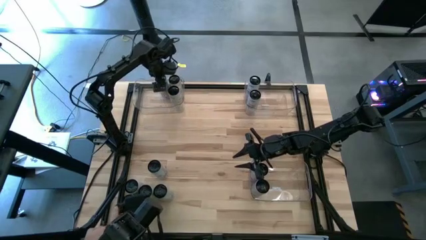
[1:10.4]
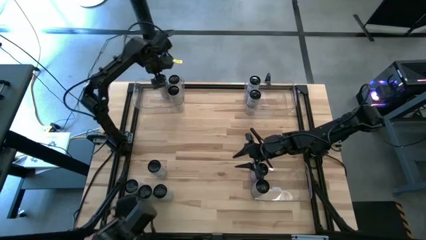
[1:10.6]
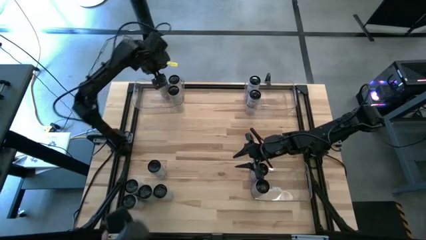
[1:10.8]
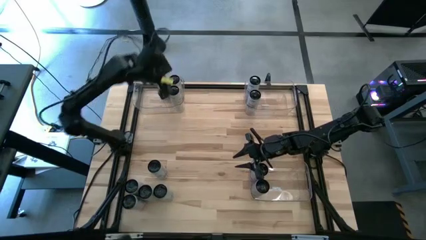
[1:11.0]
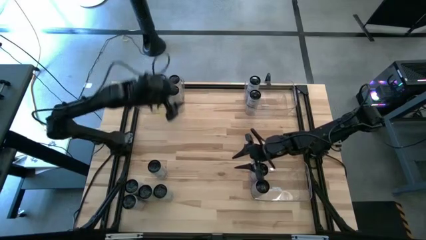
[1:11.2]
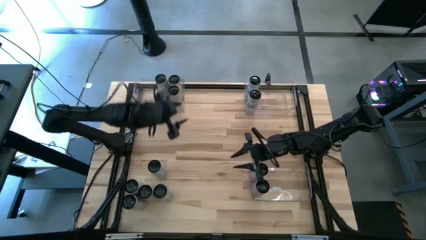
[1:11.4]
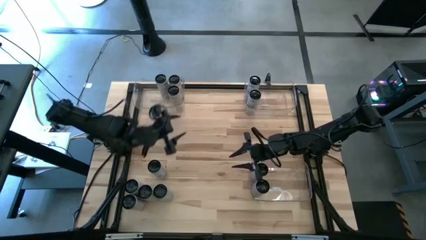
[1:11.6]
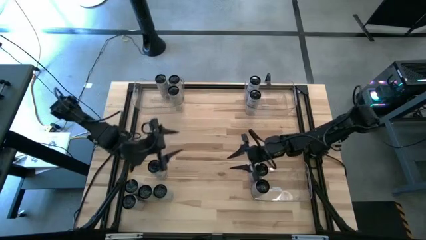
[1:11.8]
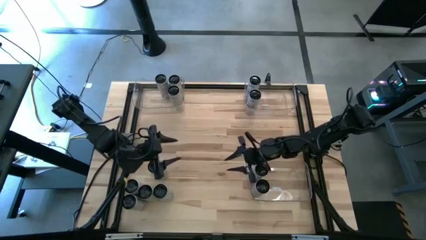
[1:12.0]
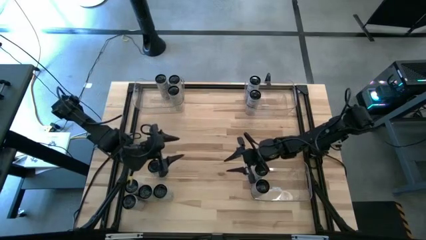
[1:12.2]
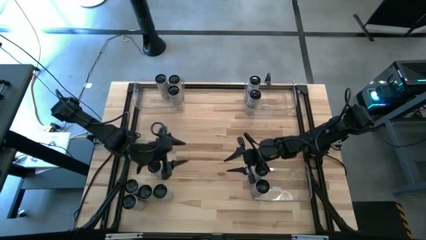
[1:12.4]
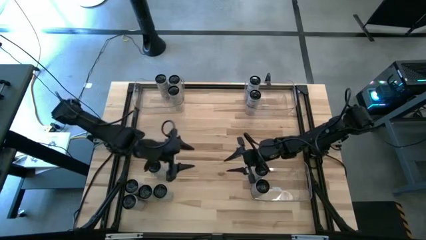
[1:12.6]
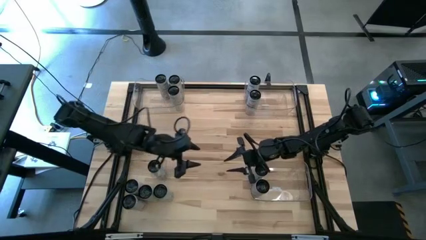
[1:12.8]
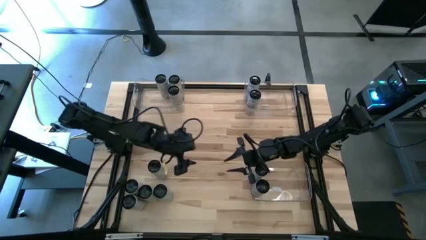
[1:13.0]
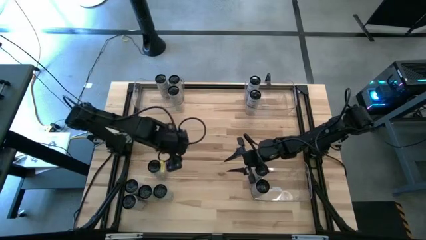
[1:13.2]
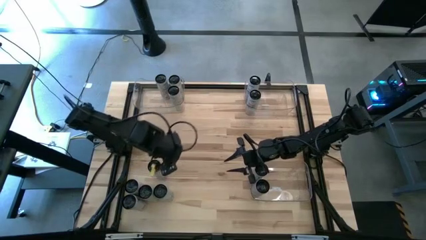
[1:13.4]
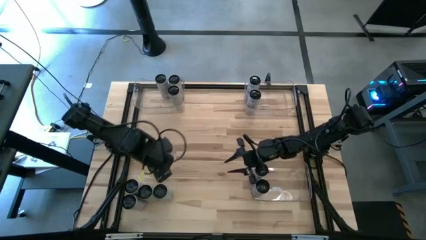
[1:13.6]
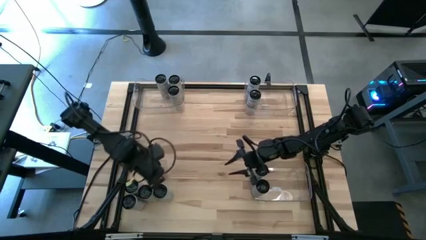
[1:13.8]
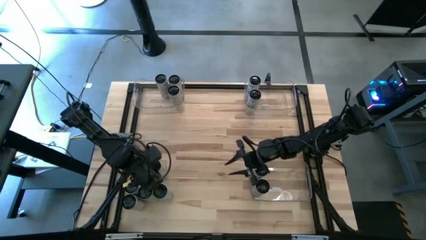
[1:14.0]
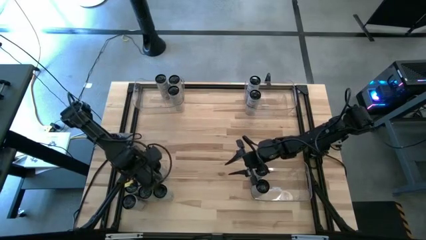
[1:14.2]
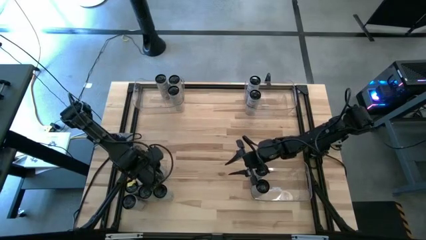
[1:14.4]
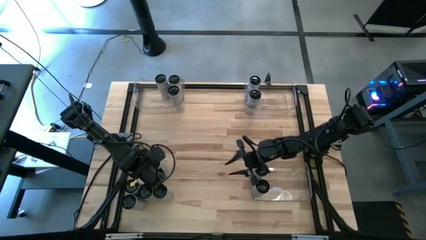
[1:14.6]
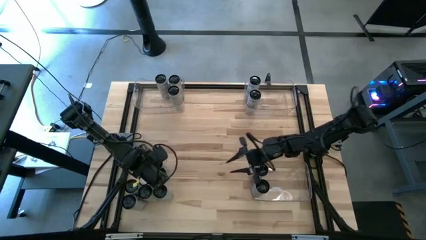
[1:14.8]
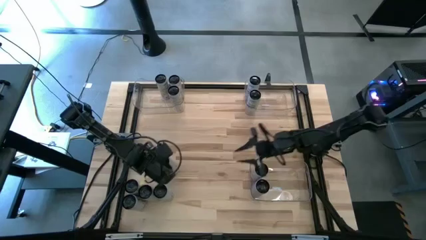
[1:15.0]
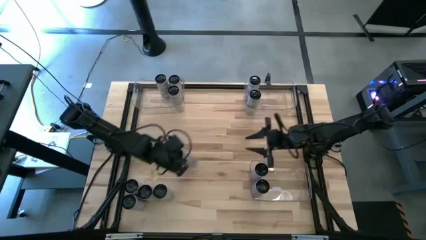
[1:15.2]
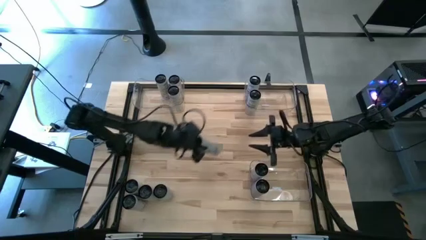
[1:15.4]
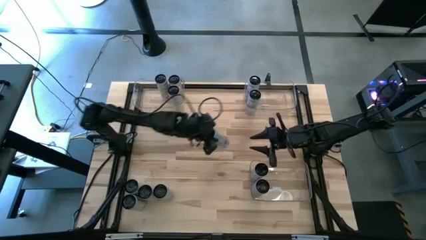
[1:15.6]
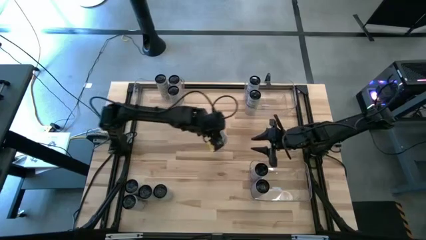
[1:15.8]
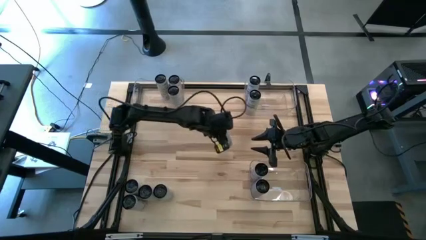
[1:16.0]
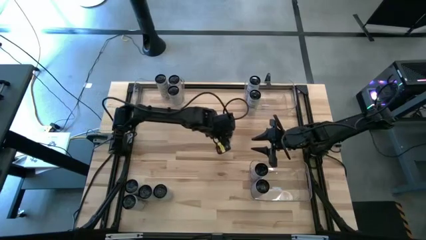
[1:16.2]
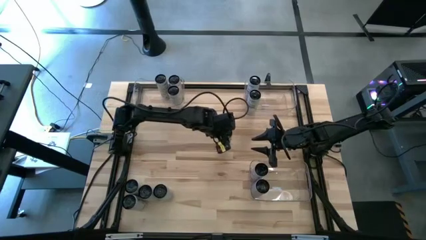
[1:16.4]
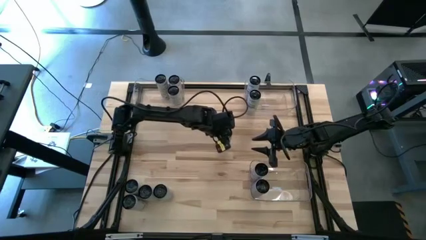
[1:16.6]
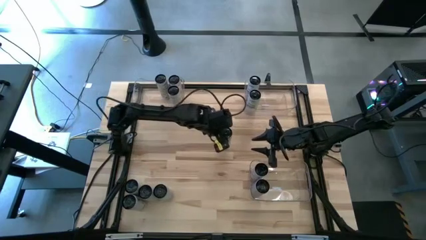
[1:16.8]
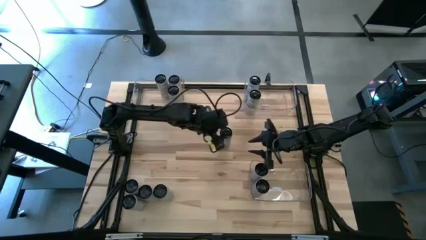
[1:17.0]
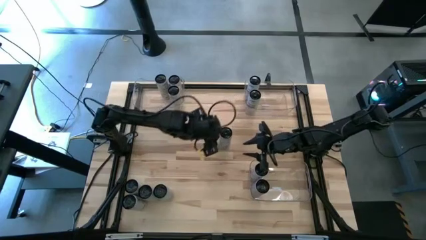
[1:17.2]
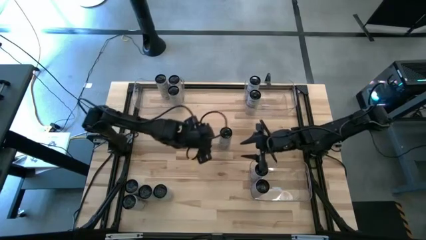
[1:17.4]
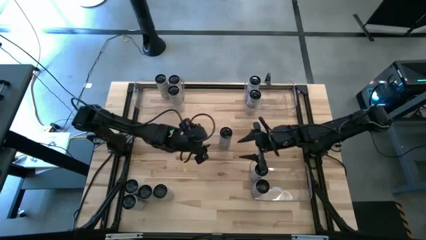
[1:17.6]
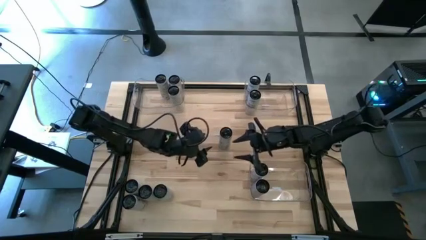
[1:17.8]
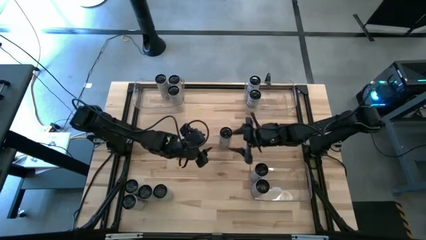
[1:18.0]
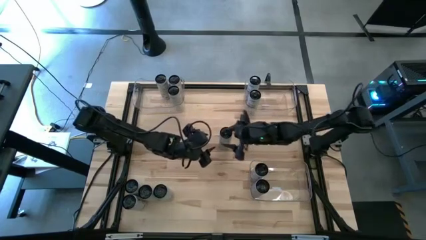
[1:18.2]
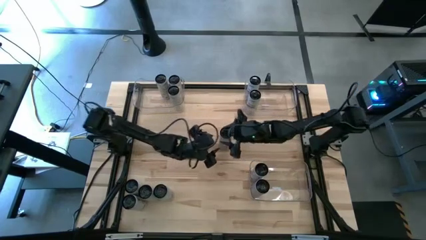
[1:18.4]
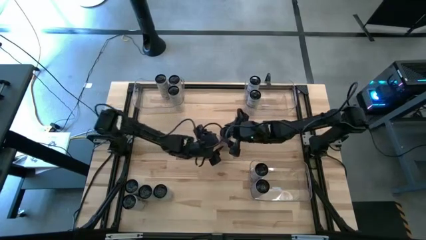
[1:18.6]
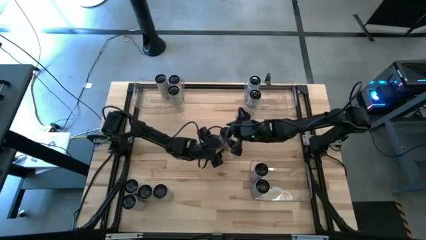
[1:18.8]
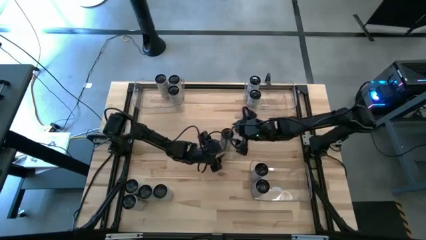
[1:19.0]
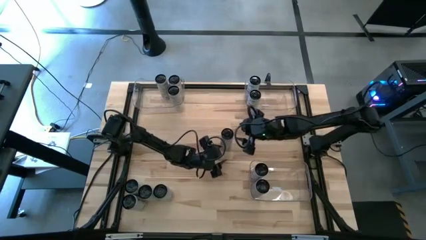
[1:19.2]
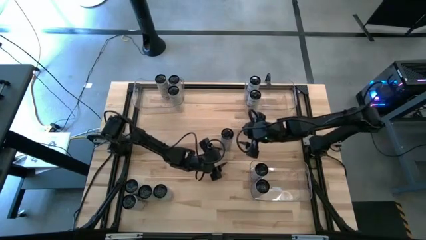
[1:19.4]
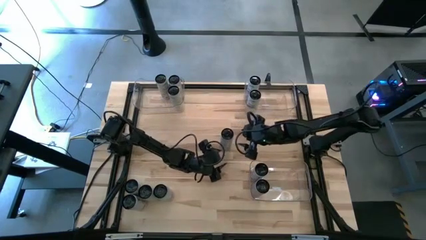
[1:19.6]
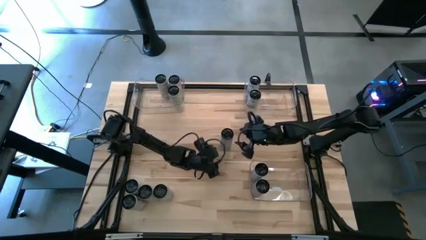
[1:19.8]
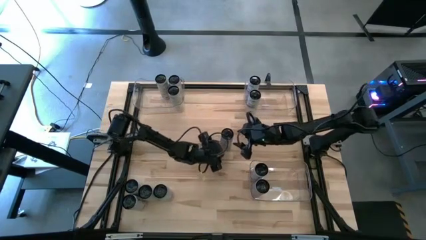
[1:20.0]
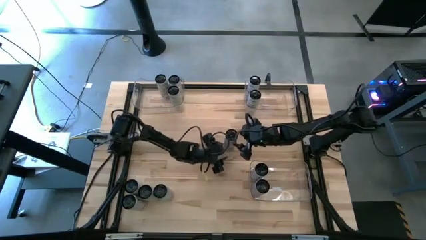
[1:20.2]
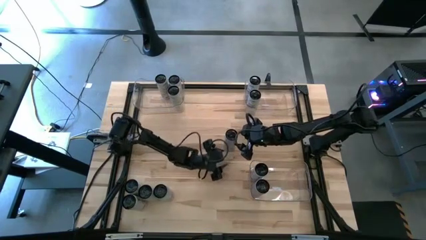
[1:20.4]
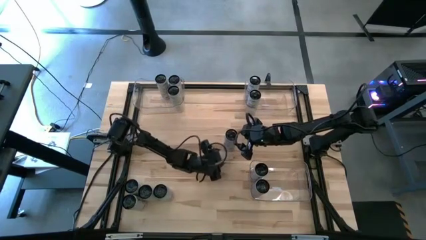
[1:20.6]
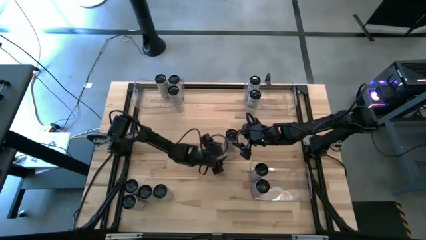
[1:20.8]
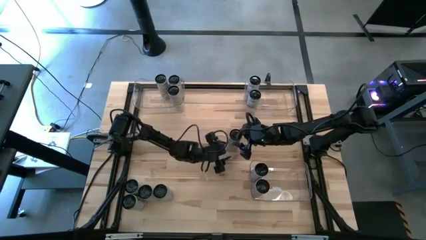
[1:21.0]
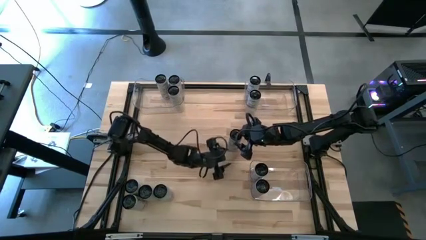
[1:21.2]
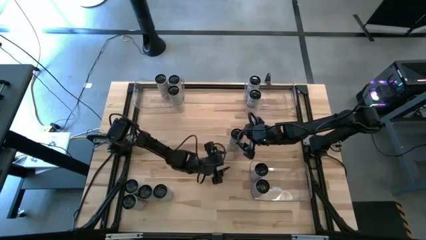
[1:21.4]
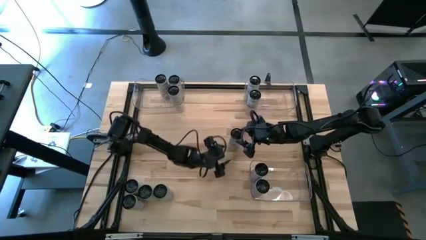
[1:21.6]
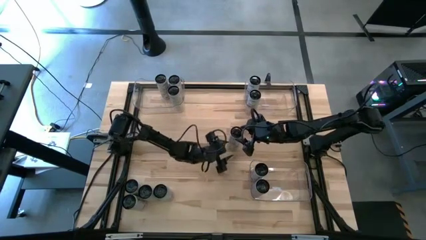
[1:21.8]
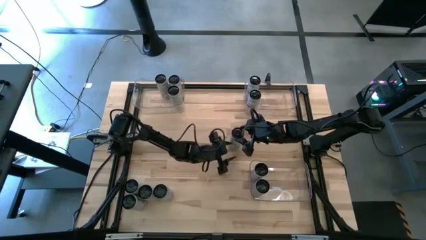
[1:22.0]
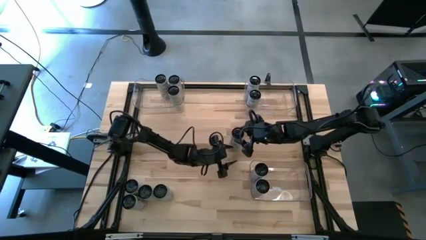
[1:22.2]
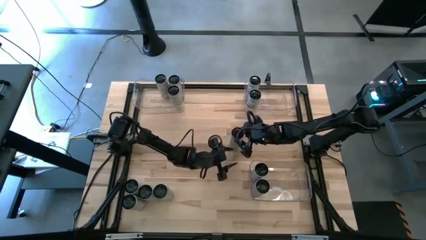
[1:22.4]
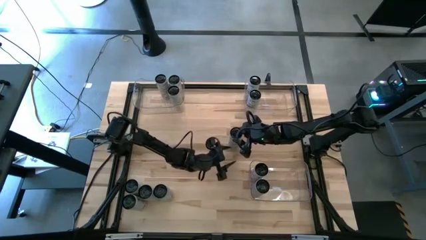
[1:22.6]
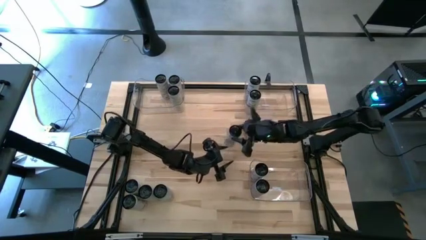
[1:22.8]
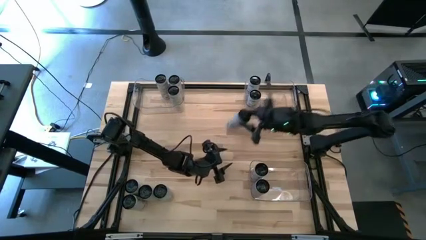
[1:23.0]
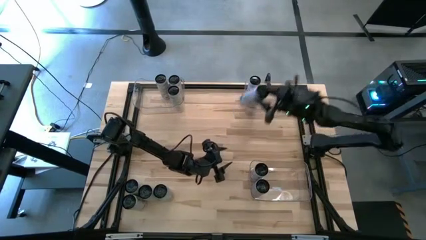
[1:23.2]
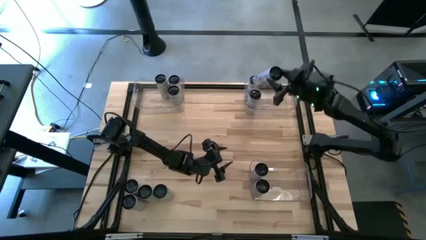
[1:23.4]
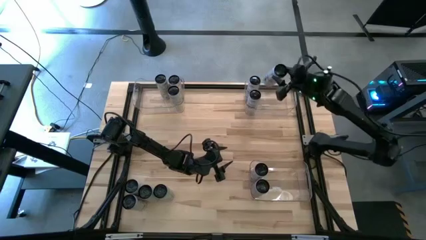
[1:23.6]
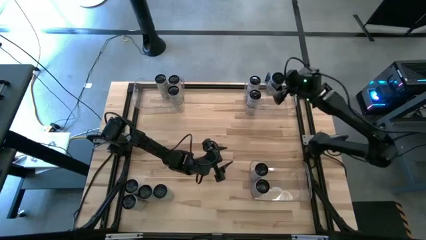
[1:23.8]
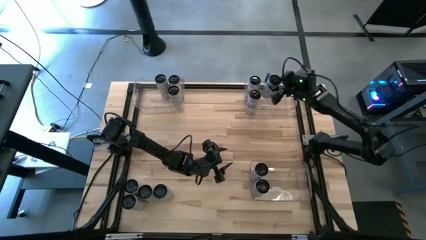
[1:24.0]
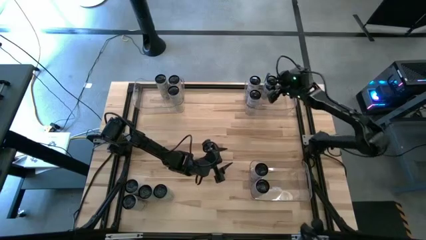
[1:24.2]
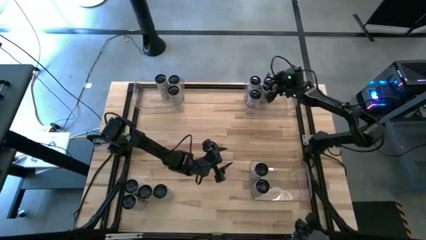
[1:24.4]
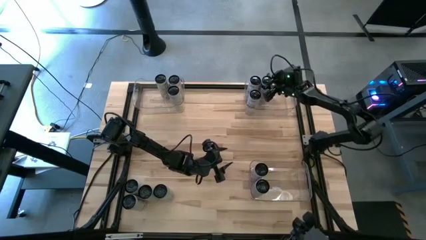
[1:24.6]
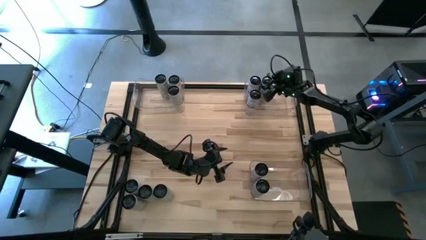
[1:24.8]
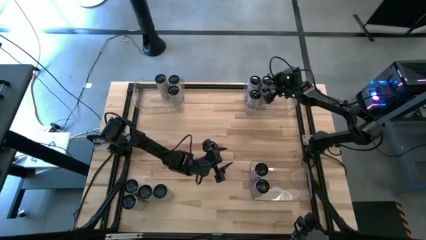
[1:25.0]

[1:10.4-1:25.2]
Task: Sort soda cans
Put the white-blue soda can into the top right transparent bin

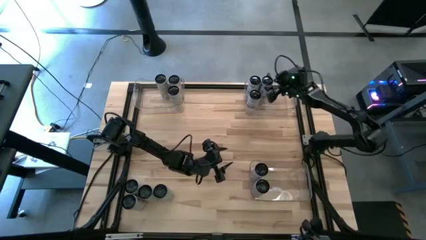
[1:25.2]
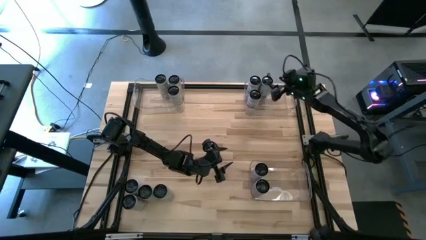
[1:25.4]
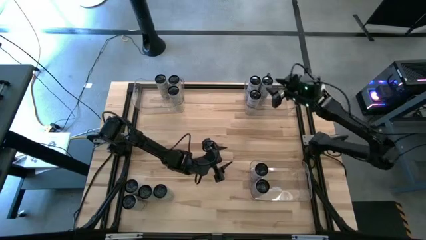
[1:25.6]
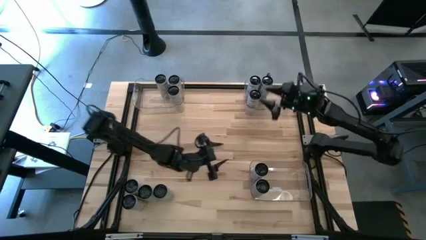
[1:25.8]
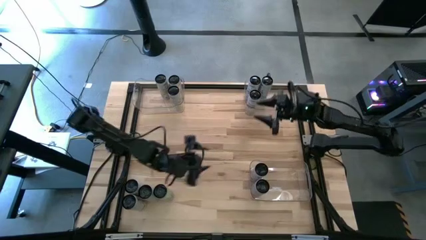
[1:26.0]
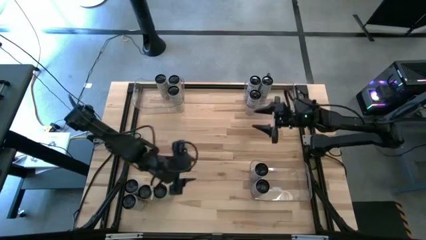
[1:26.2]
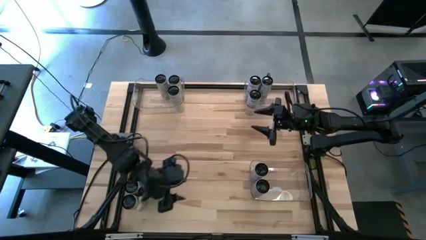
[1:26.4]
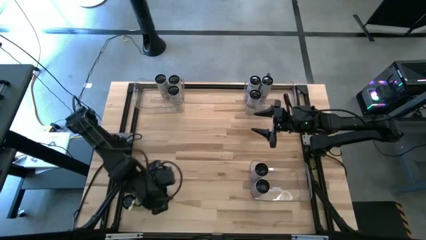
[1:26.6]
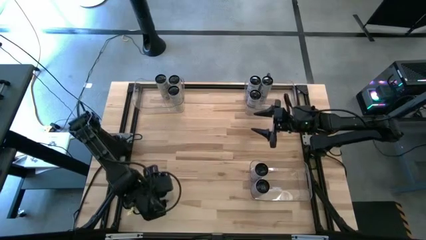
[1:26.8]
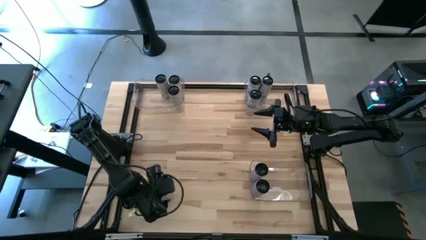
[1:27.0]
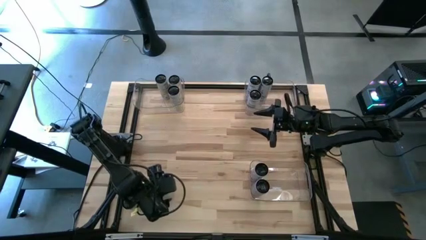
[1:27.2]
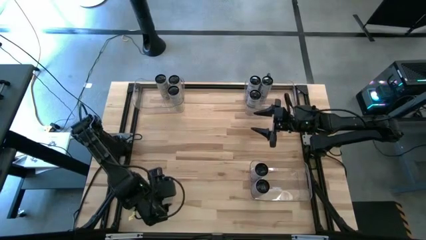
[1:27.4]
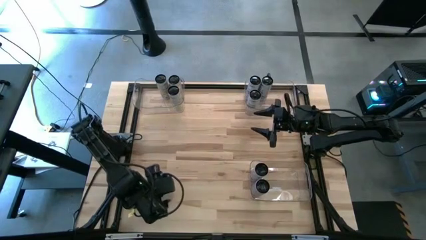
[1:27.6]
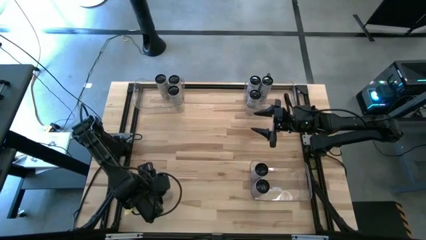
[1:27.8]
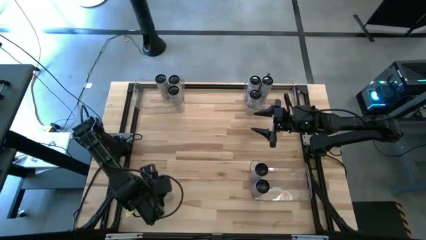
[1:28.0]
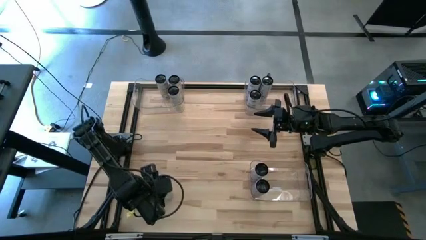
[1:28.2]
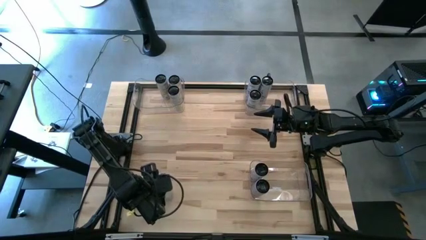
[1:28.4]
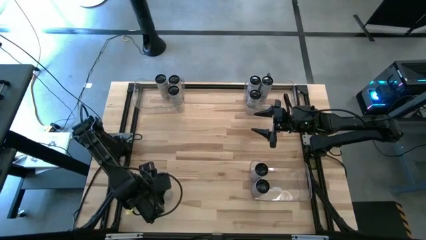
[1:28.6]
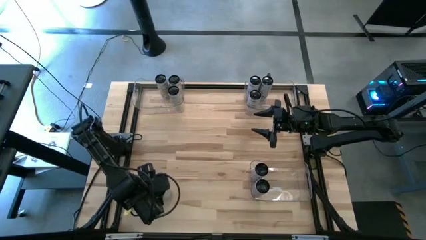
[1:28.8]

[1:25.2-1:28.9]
Put the white-blue soda can into the top right transparent bin
